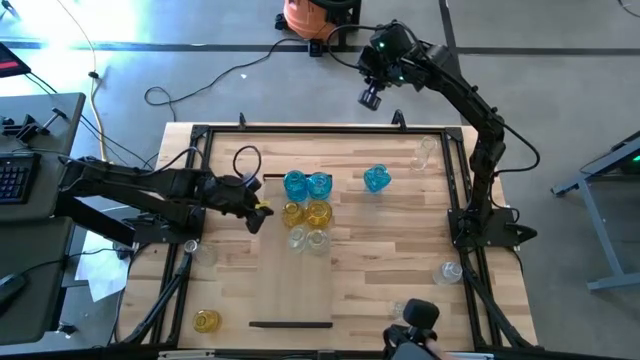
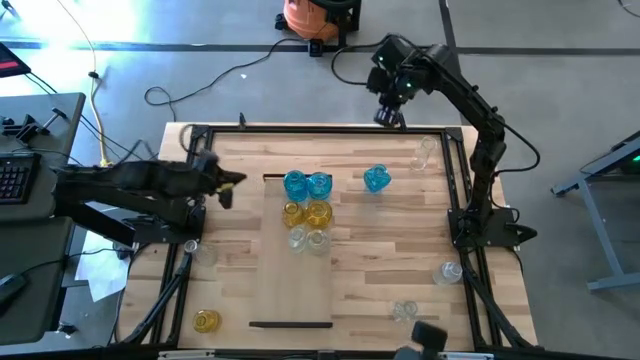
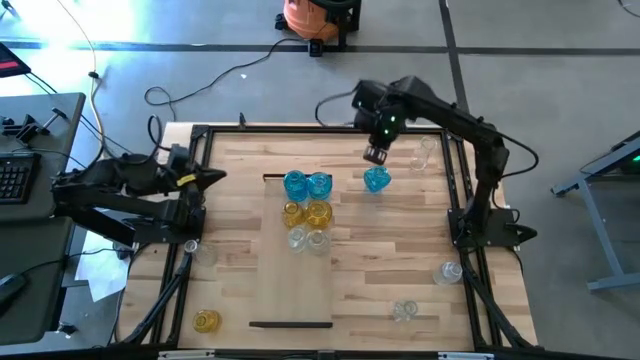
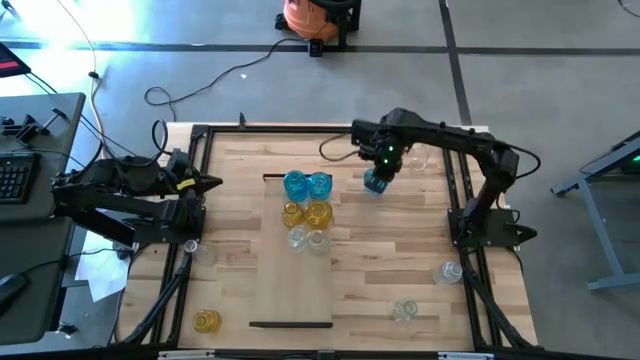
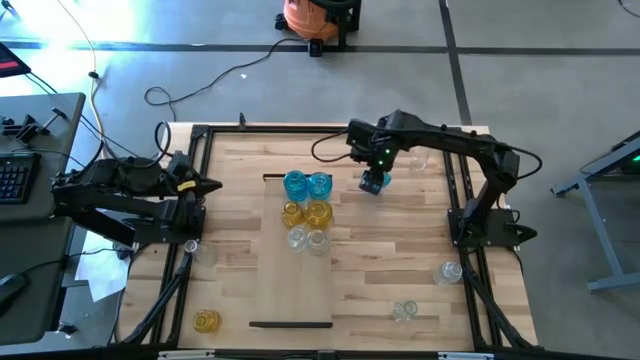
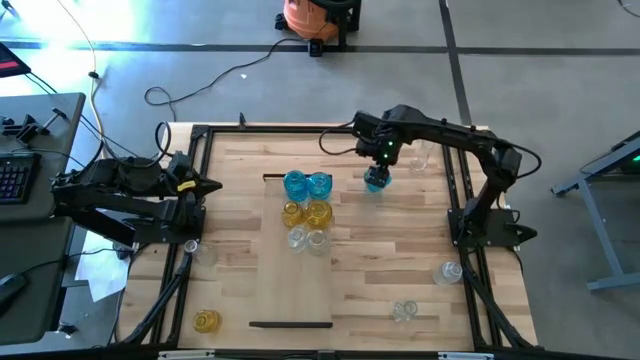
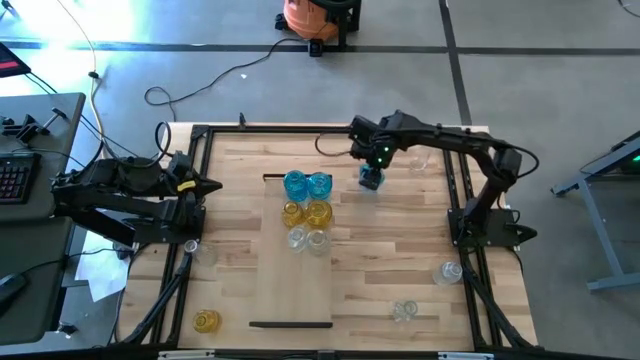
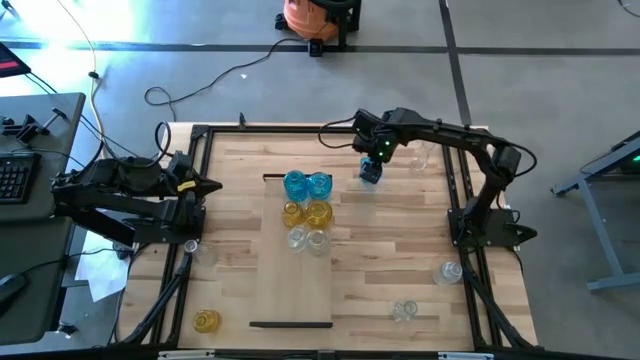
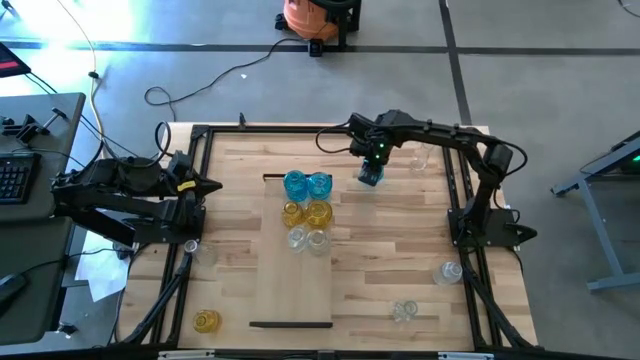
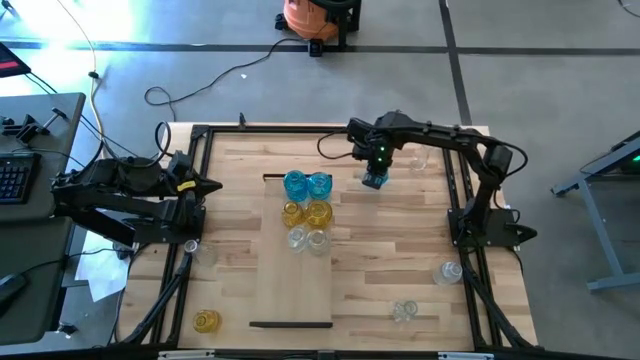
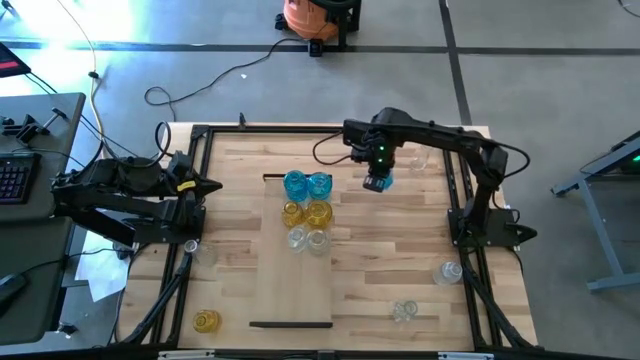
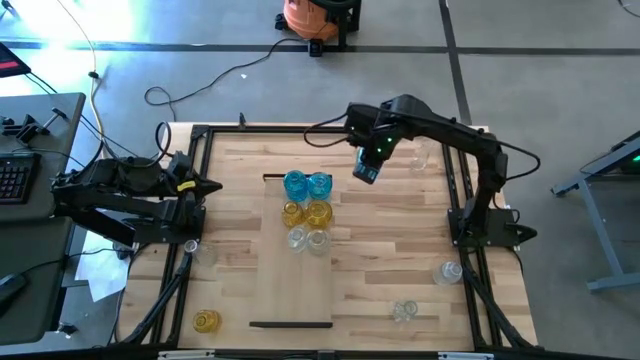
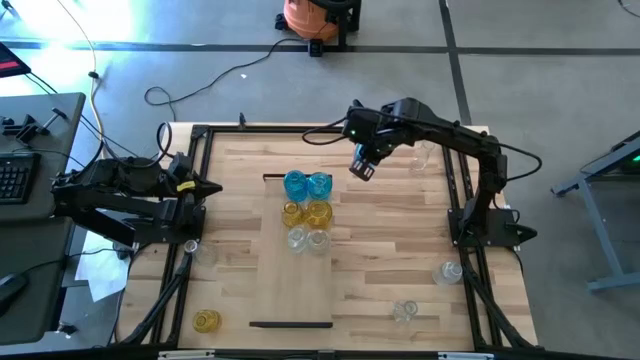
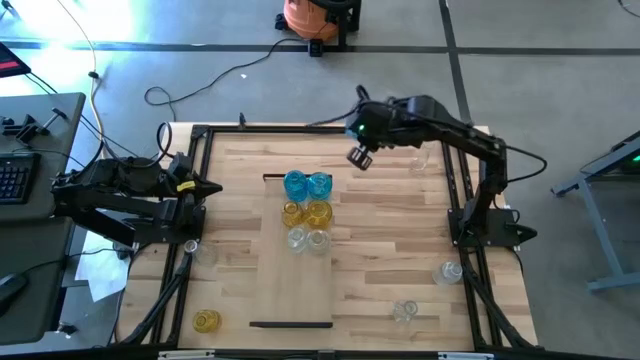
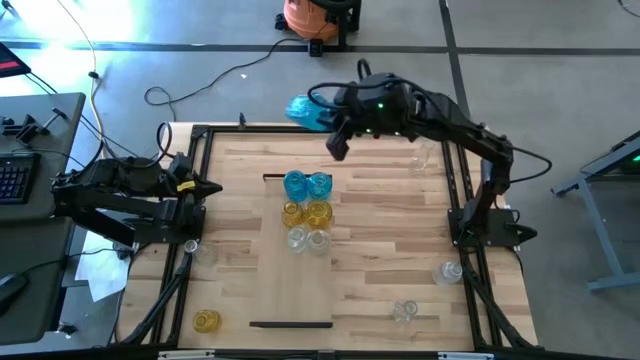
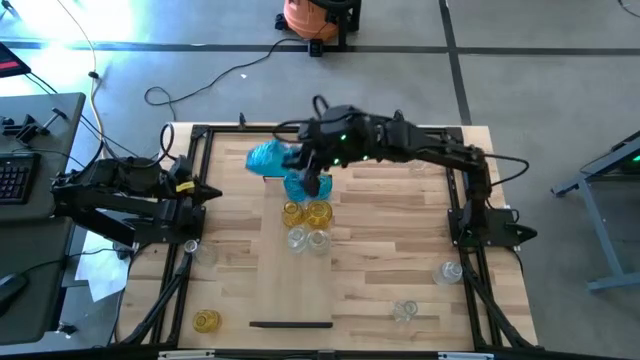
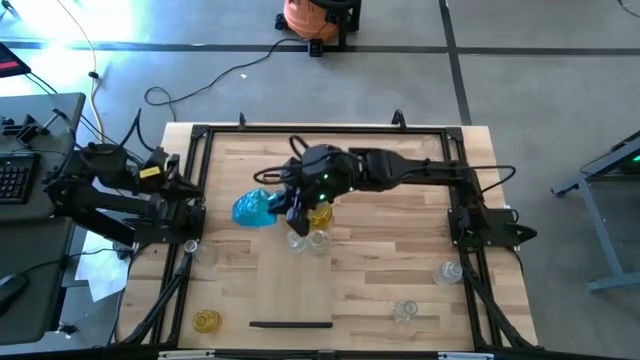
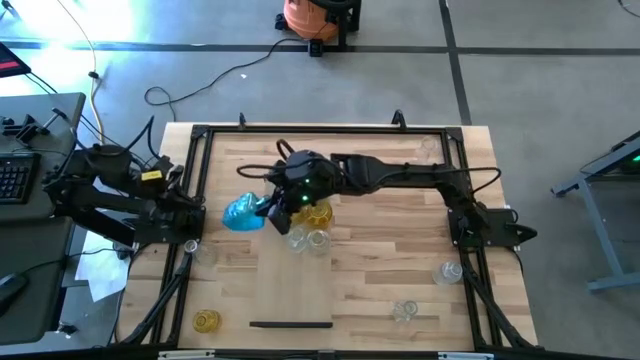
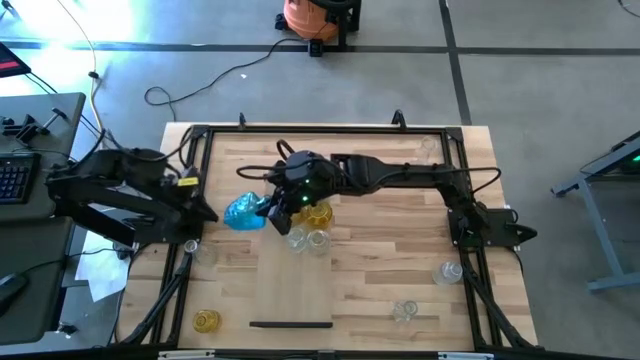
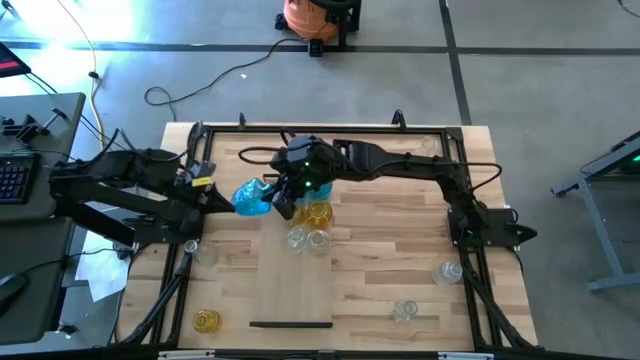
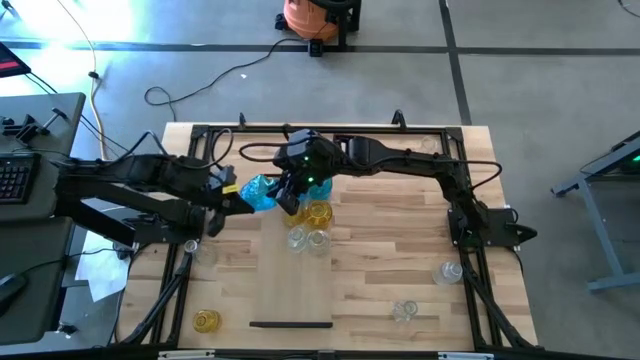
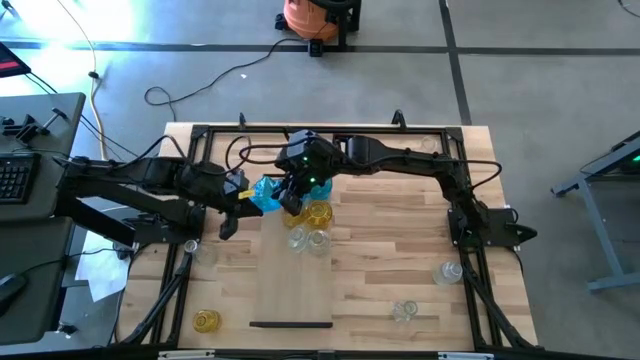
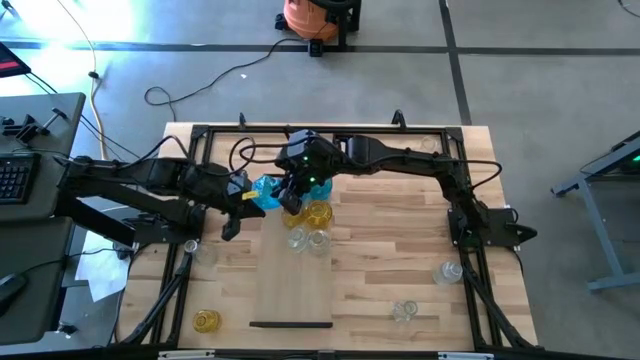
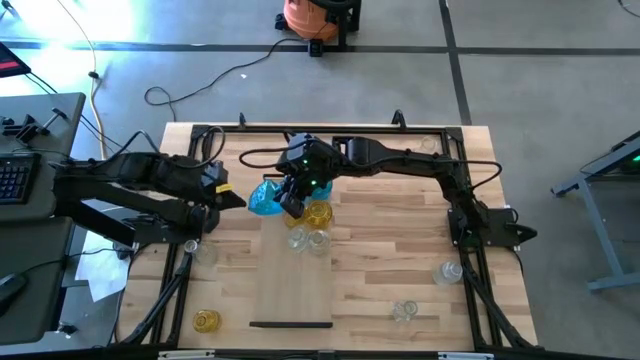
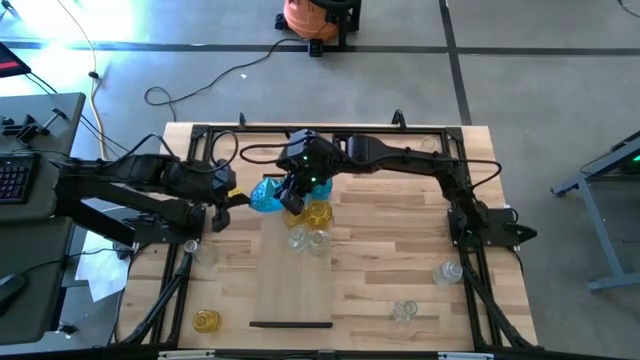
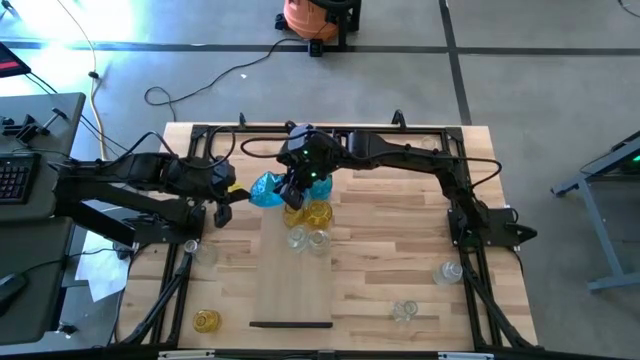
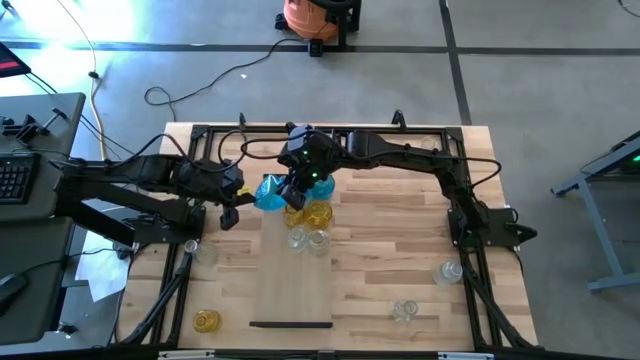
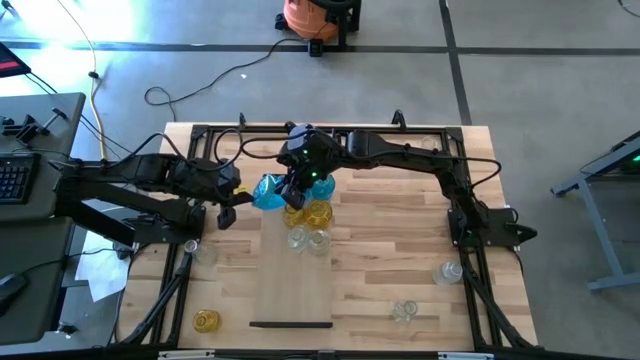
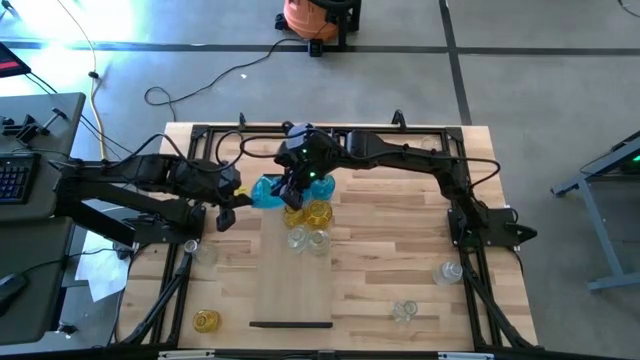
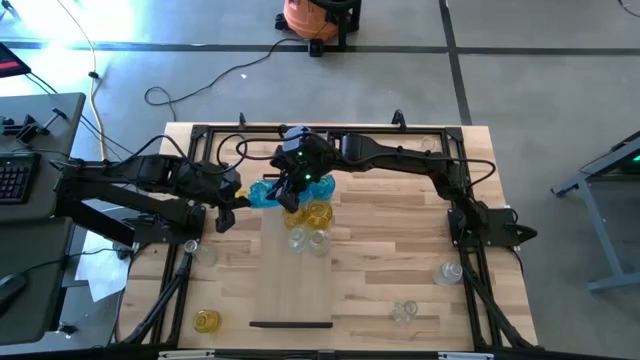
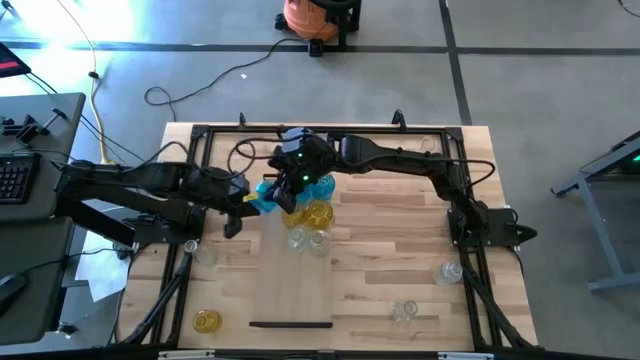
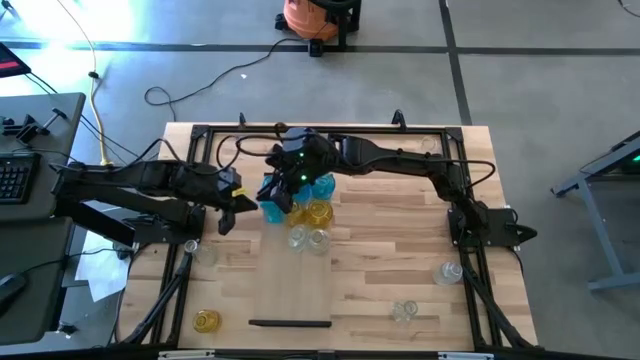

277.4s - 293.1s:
Task: sort vases onto shelf
Put the blue vase on the shelf to align with the other blue vases

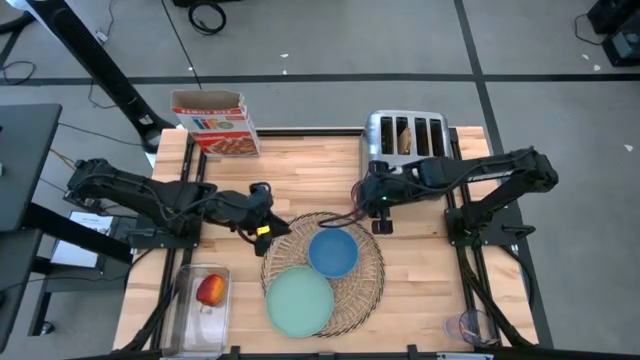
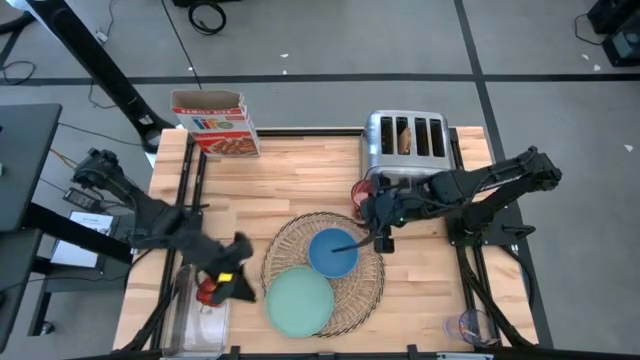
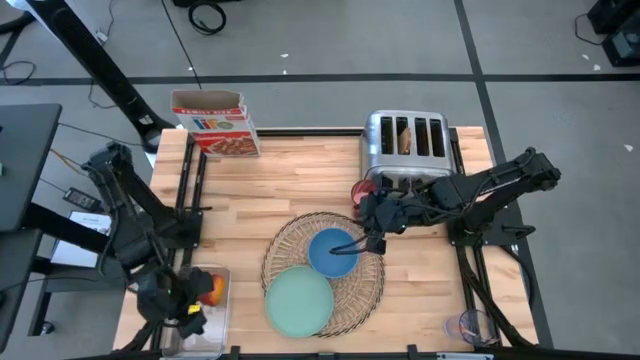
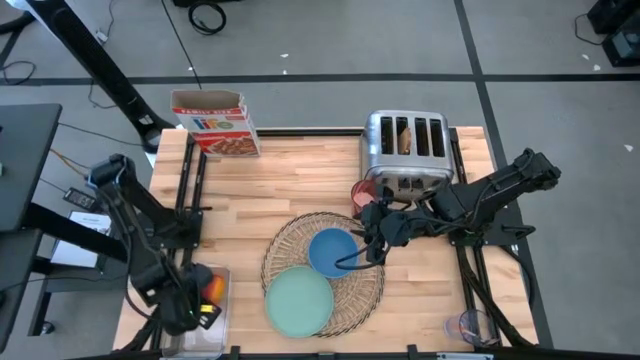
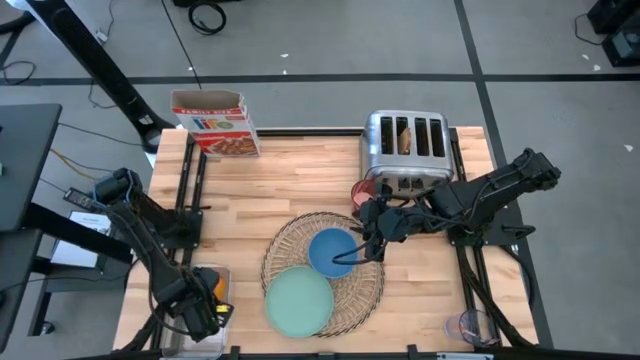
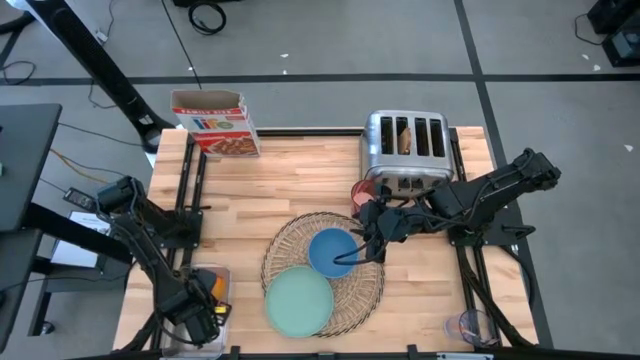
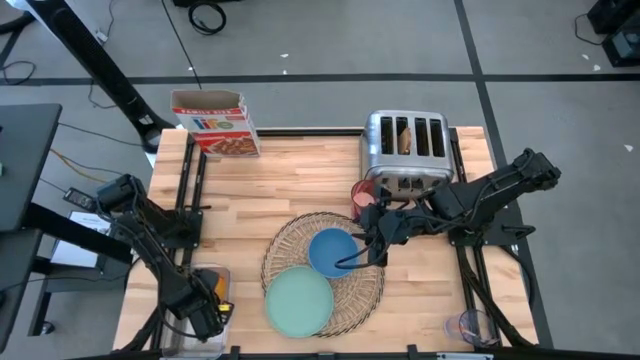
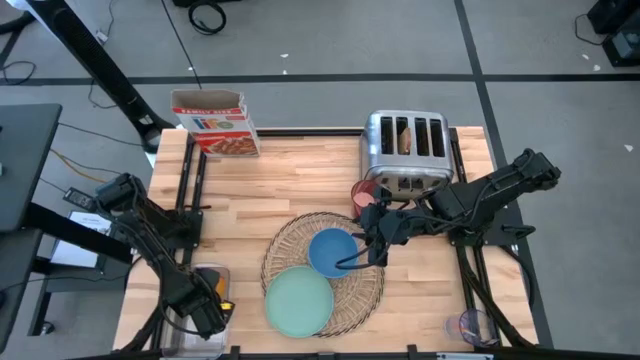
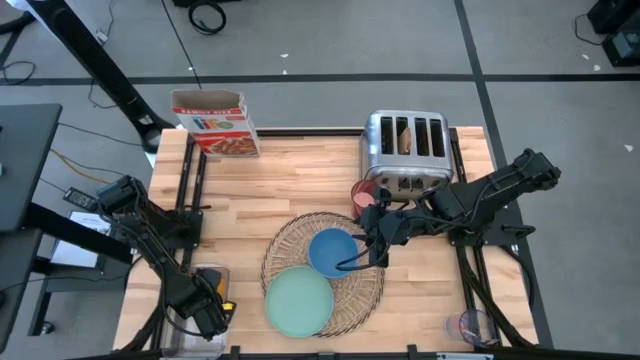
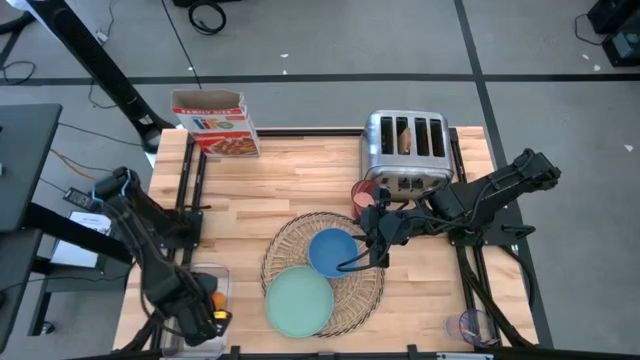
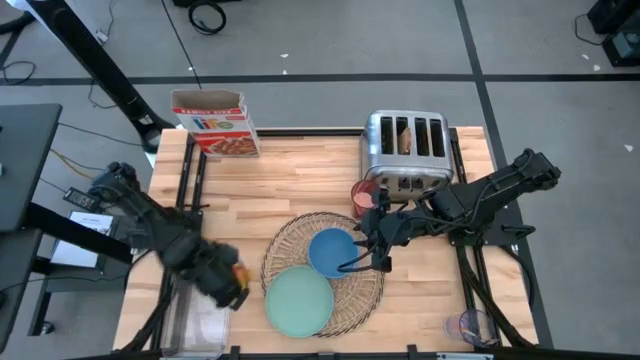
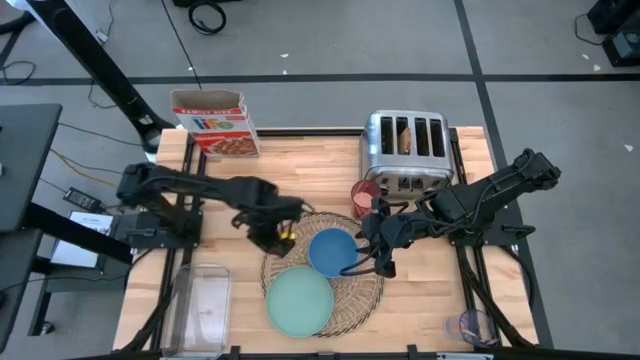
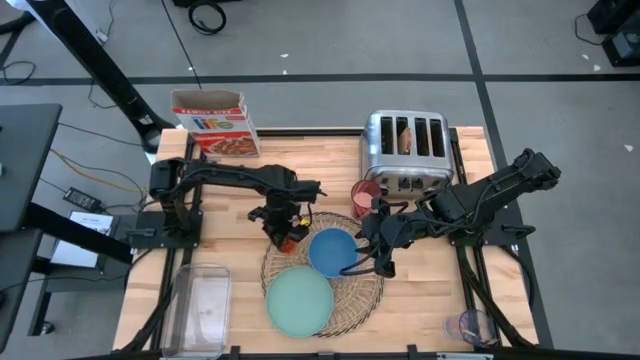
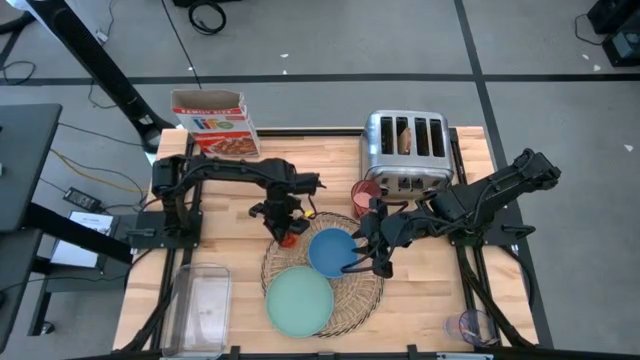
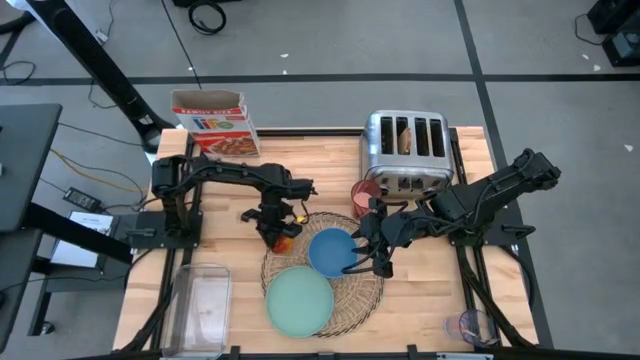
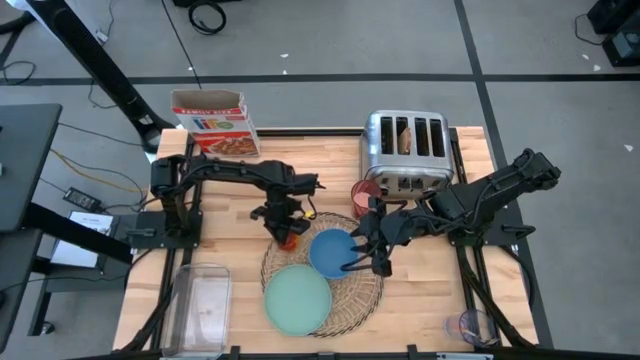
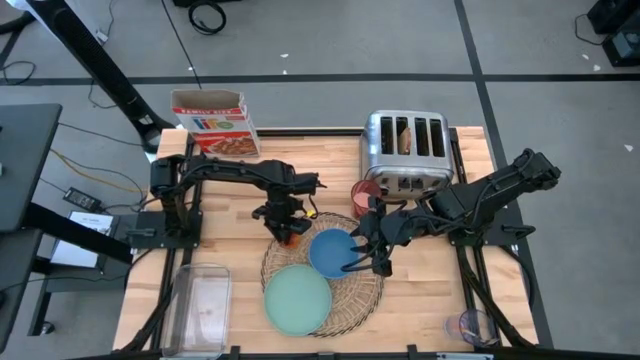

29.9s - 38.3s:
Task: Arrange a breakfast setting
Put the apple on the brown tablemat to the left of the blue bowl
